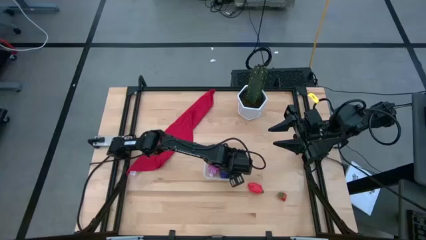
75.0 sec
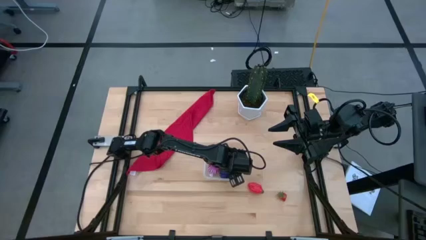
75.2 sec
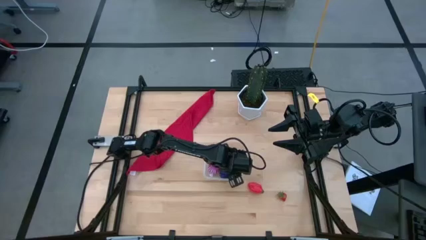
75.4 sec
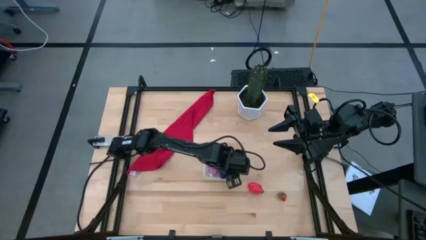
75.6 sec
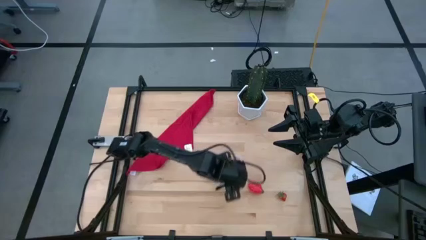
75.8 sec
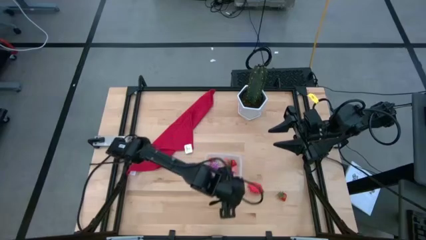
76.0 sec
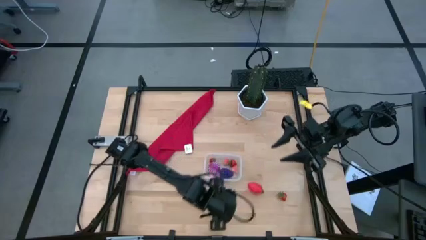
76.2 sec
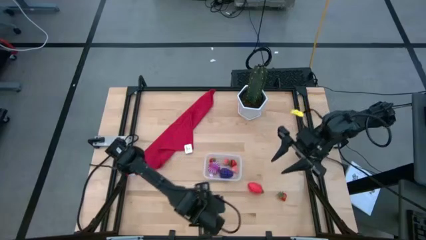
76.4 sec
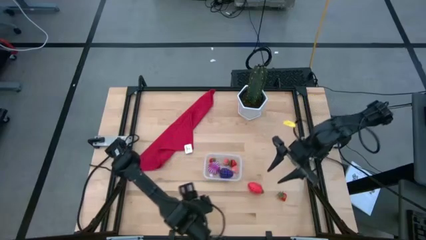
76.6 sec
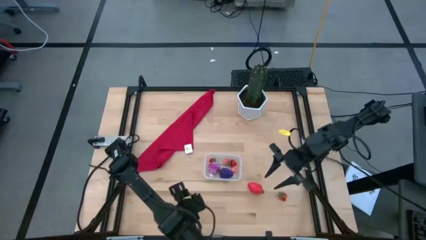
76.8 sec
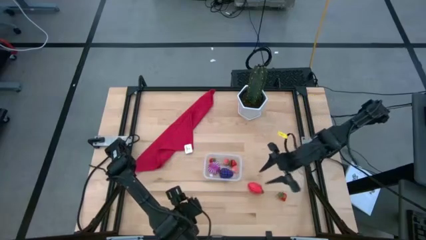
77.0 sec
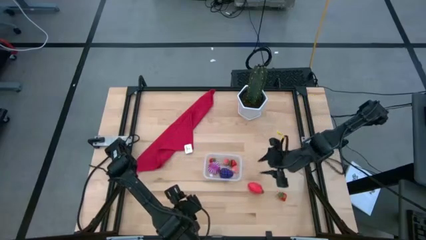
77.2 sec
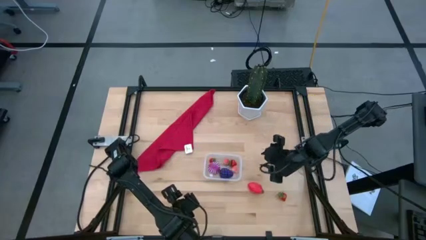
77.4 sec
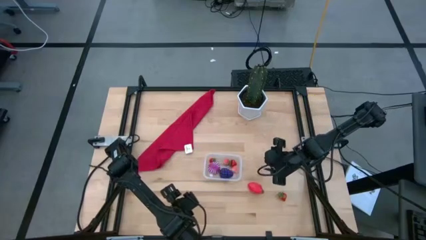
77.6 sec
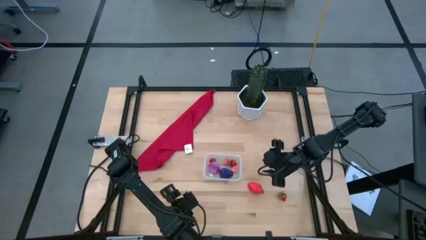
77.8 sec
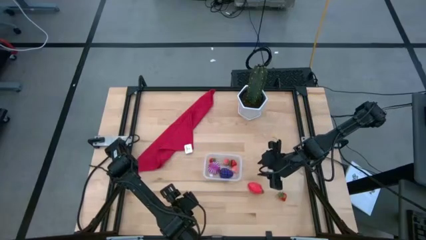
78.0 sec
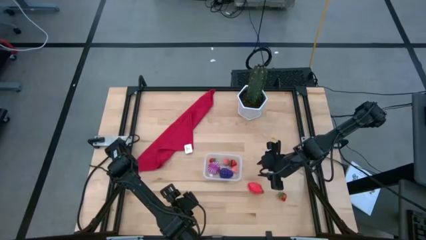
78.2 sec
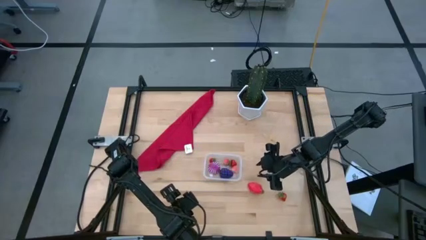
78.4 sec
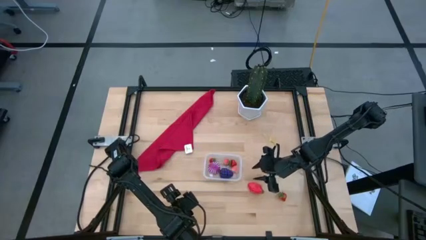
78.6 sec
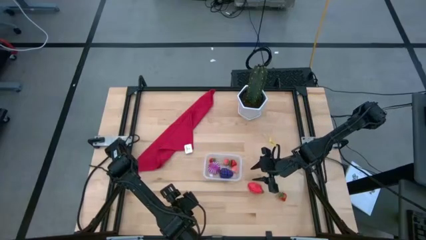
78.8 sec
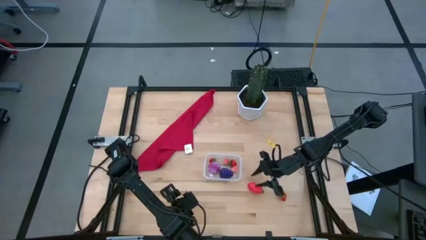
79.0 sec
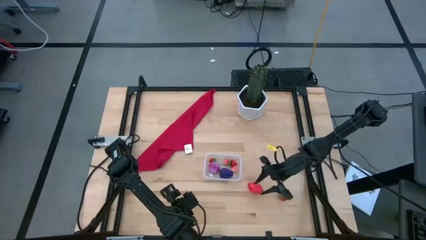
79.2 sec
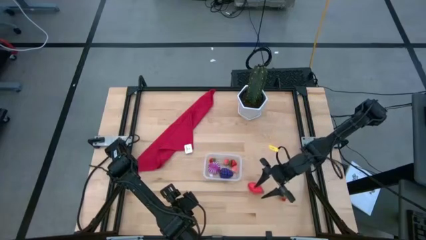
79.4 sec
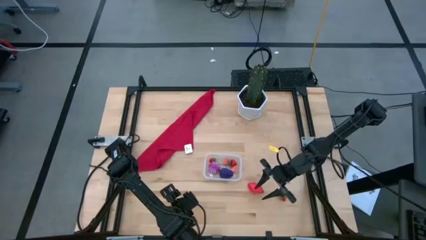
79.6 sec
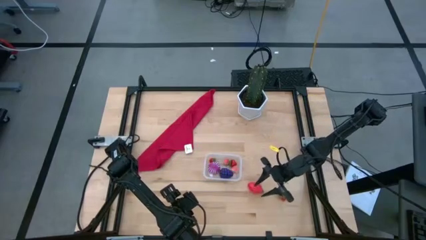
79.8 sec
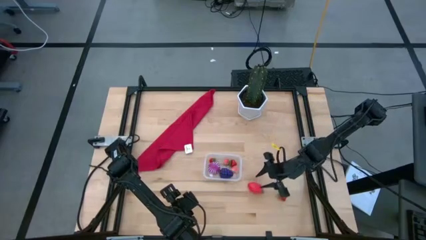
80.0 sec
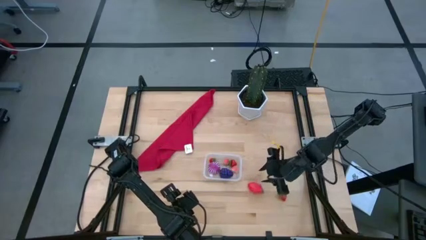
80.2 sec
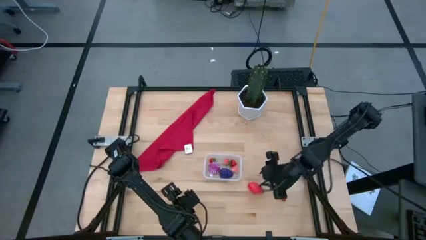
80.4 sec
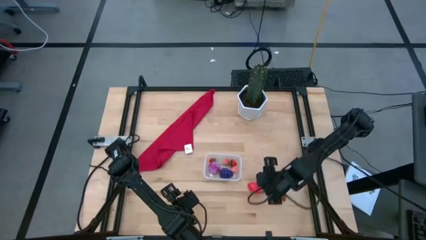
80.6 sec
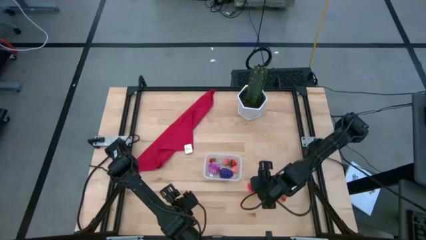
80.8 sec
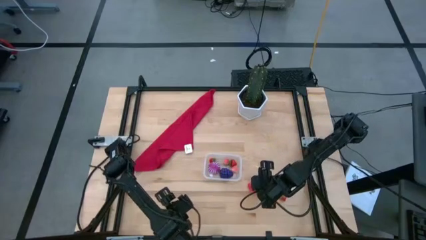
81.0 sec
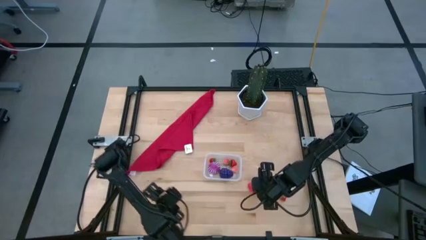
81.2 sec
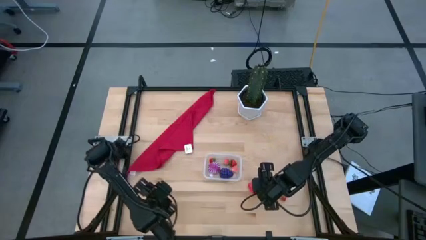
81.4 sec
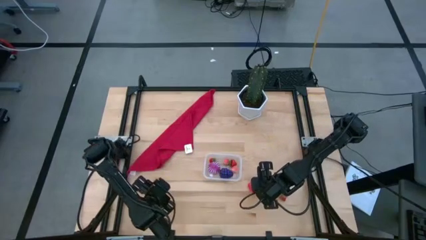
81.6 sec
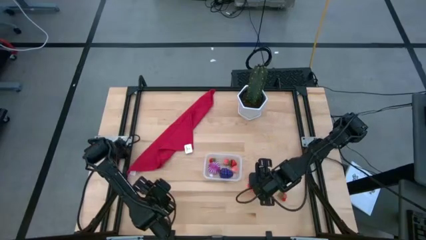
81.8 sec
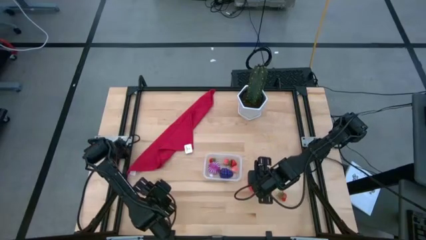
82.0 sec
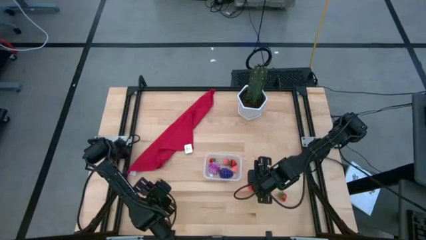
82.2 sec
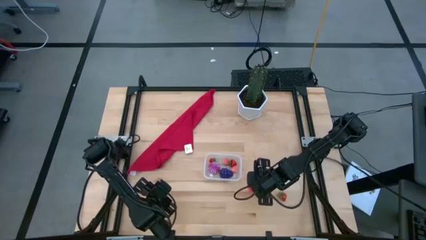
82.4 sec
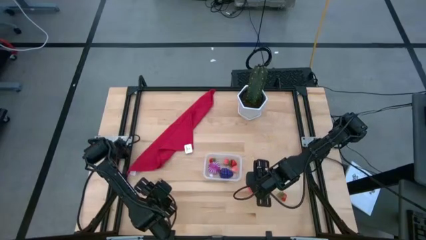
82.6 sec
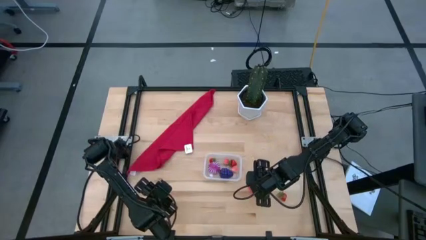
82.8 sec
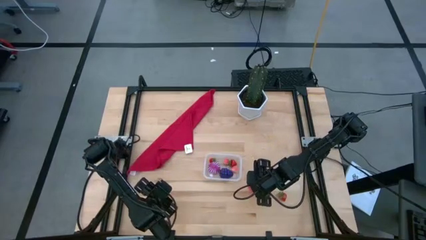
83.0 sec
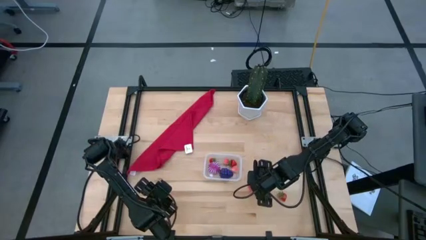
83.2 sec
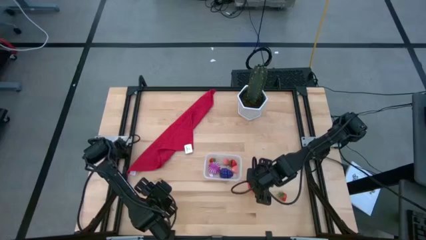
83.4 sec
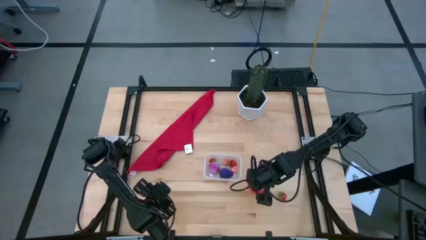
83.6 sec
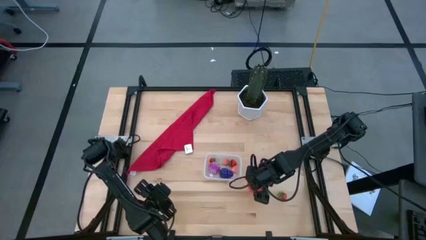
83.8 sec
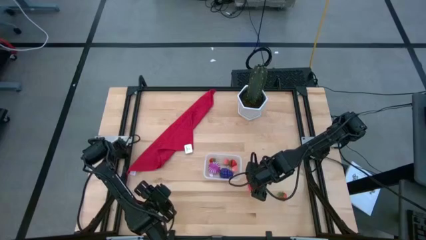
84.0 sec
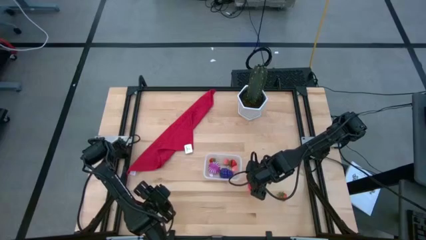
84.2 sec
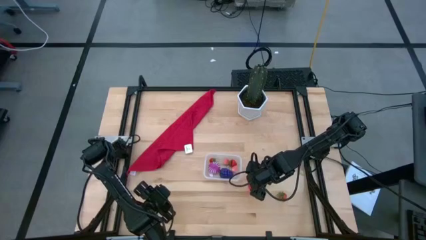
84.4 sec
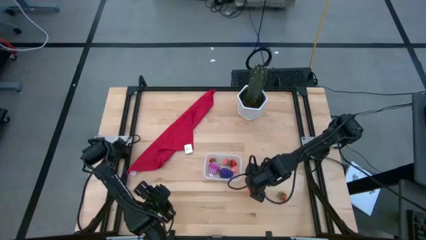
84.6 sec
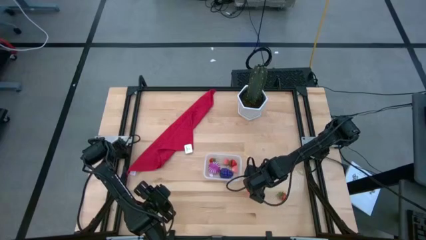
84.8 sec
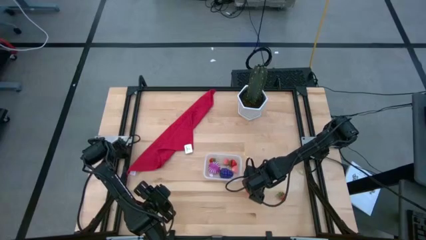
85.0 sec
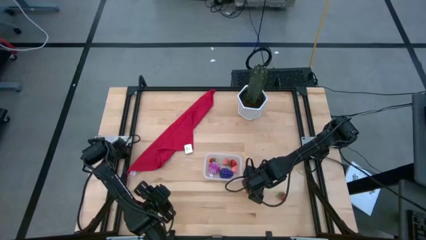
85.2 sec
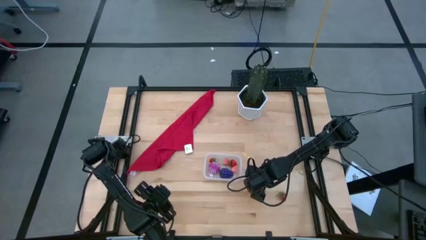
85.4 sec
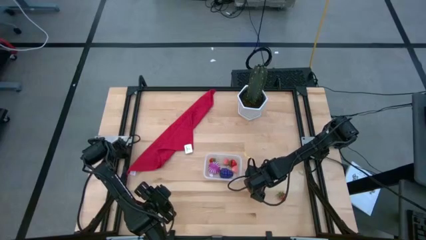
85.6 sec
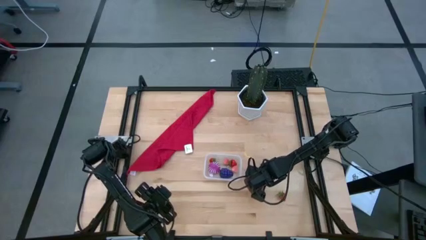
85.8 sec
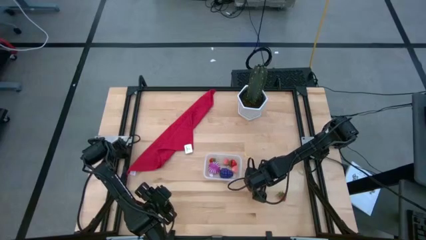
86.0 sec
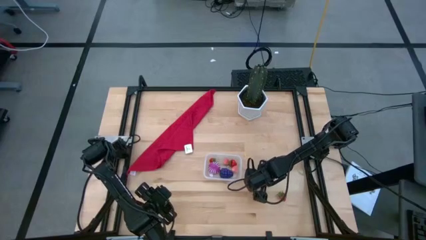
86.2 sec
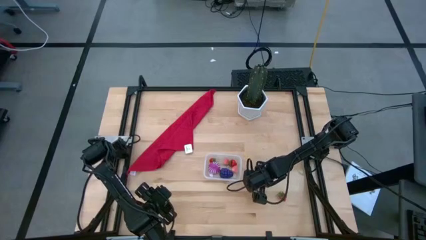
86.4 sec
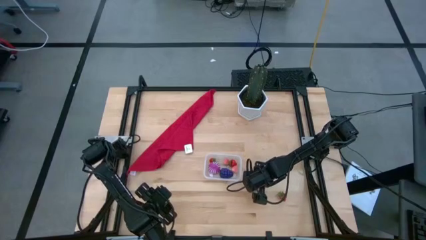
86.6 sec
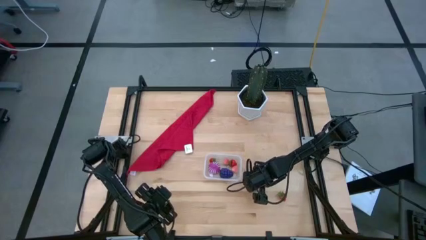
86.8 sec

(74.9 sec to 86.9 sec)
Task: Pick and placing Produce into tupperware
Put the pink dragon fruit into the transparent bin
